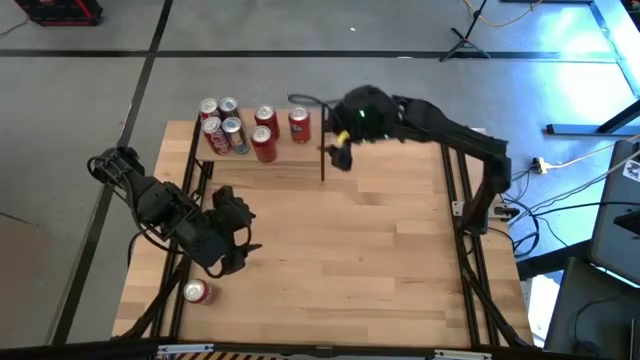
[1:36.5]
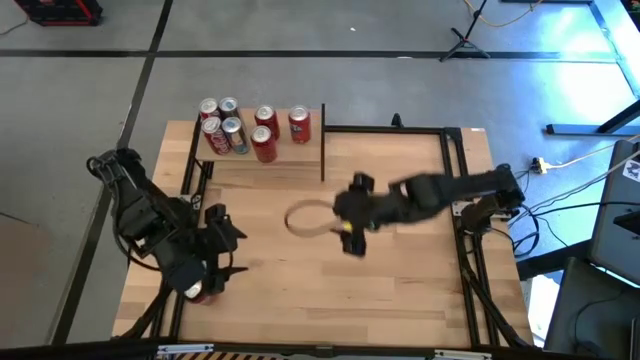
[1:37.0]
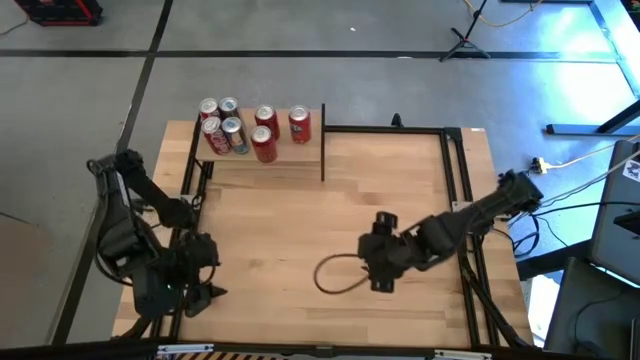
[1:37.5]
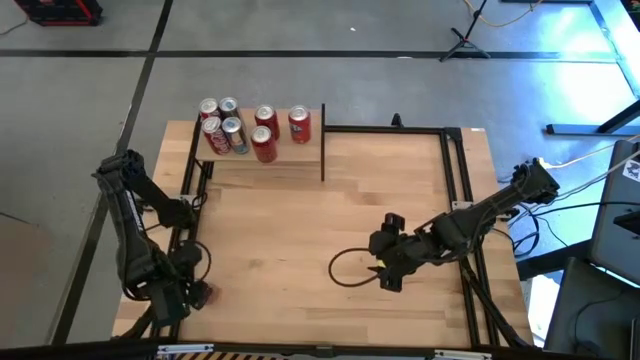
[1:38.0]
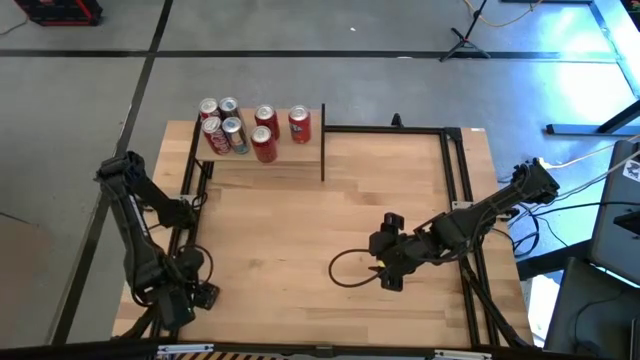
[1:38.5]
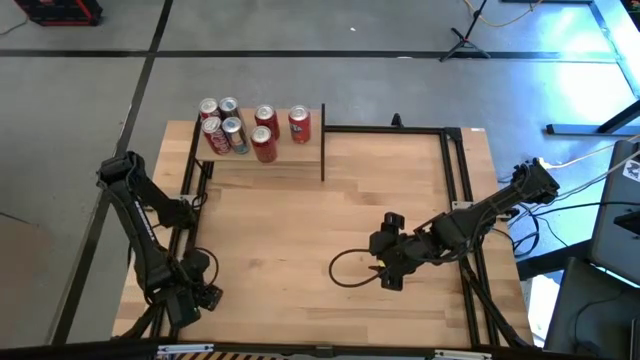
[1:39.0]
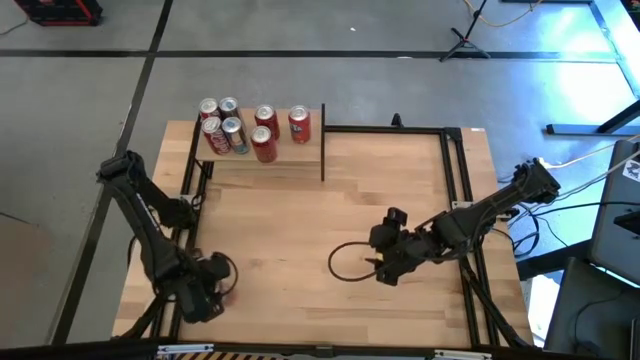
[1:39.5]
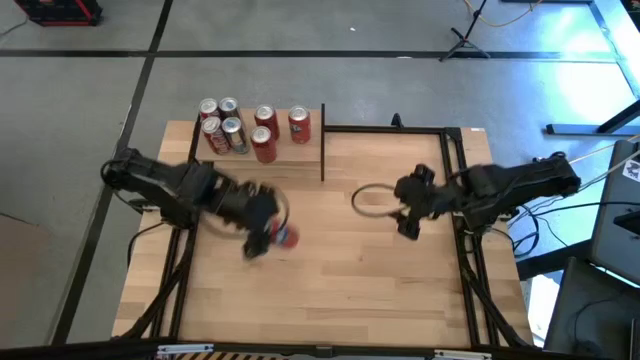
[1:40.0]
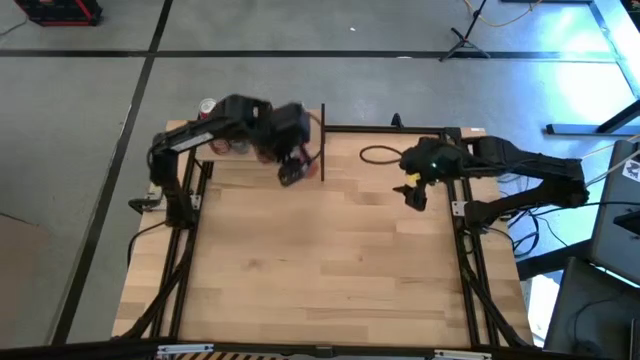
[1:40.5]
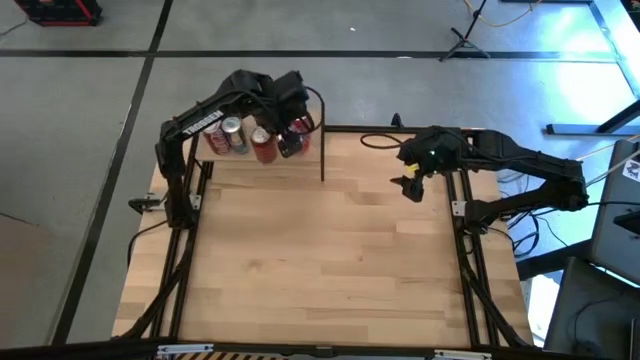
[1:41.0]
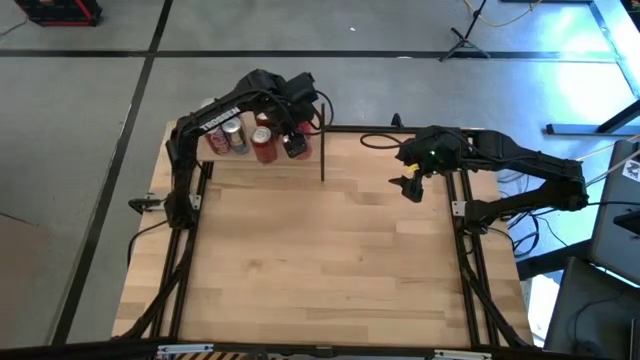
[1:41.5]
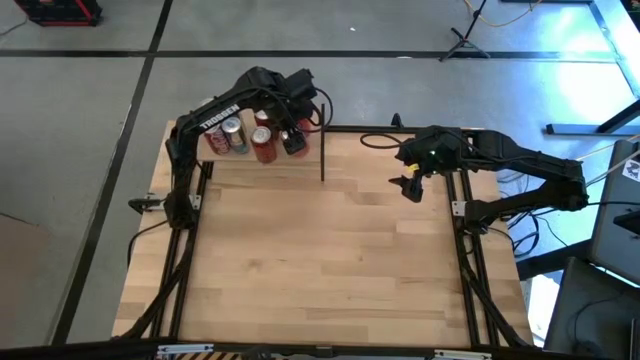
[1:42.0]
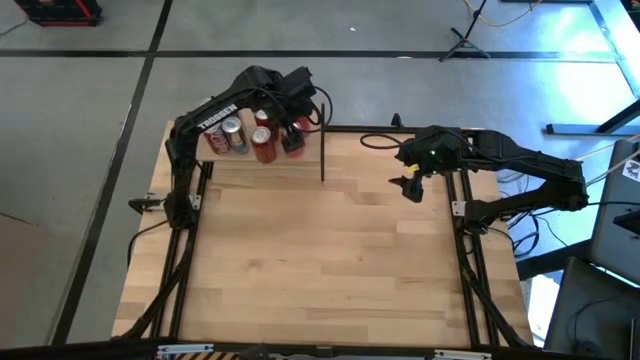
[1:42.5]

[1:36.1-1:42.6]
Task: Place canned beverage on shelf
Put the orange soda can on the shelf aligned with the other orange soda can

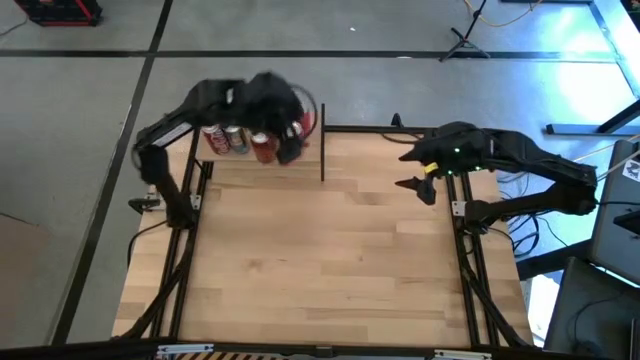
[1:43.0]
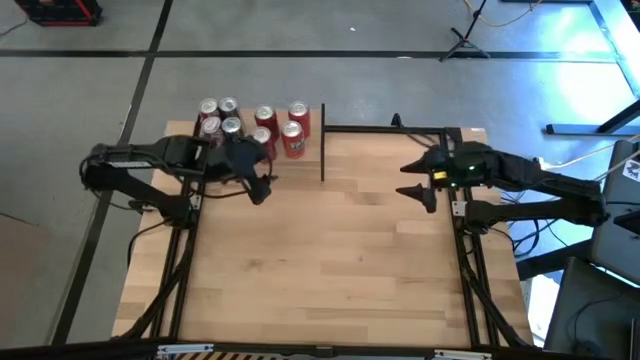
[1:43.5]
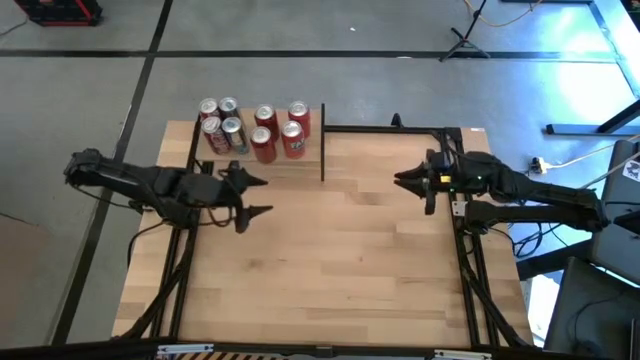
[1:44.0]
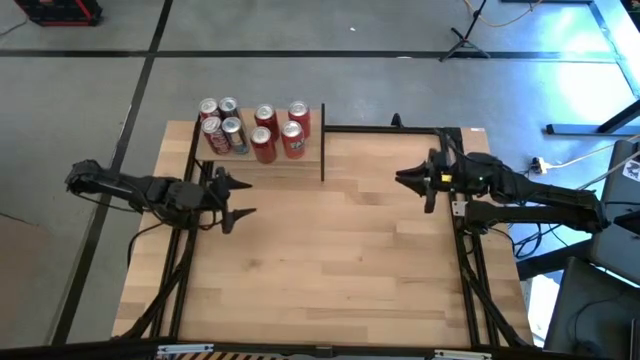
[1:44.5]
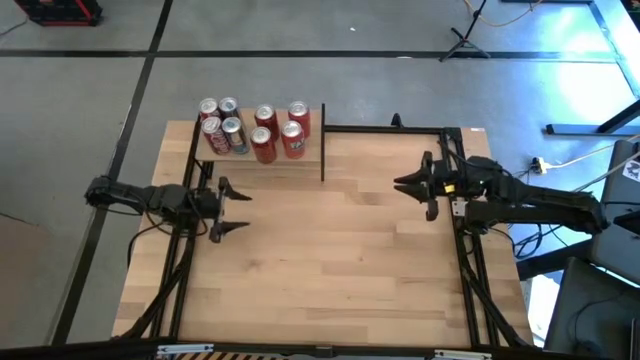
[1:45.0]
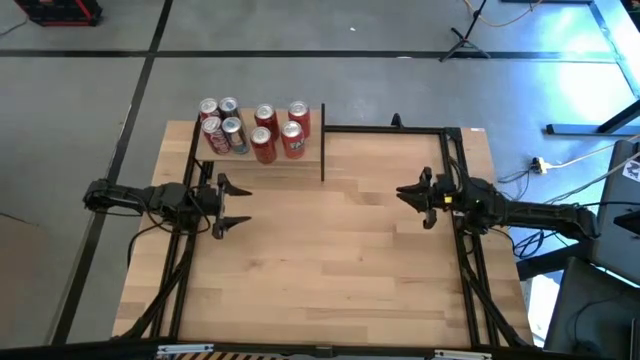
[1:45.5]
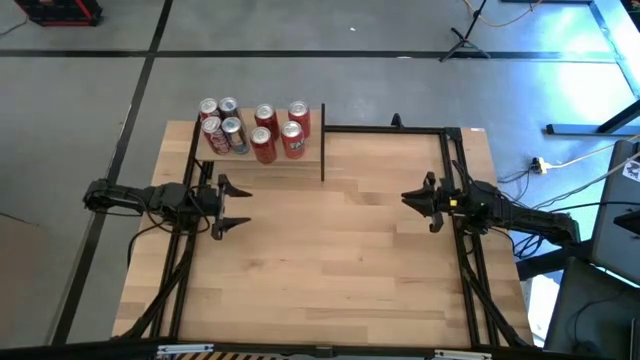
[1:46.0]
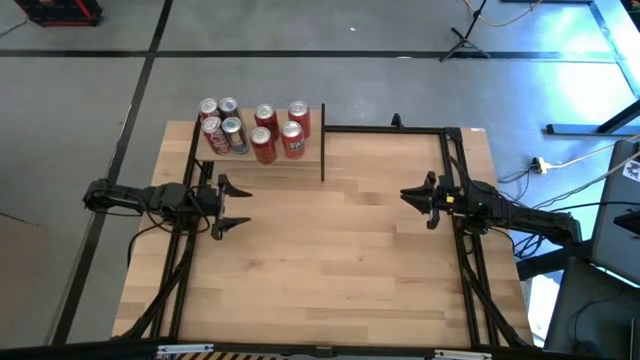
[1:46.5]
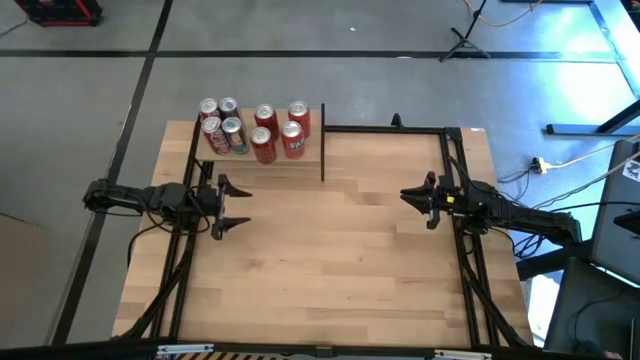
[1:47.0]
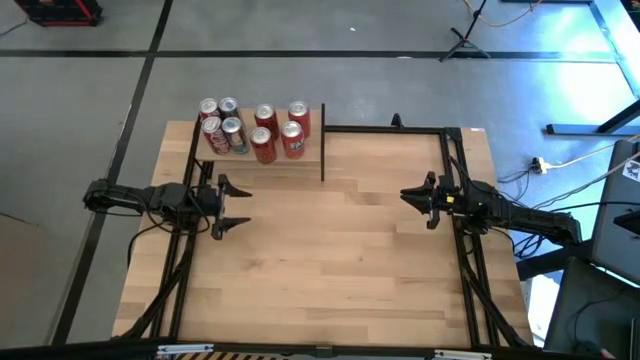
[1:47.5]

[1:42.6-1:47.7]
Return to Home Position

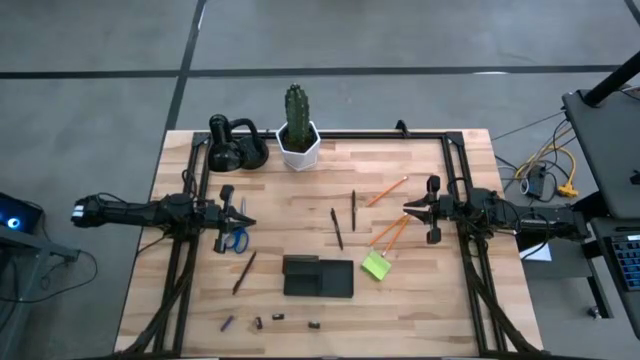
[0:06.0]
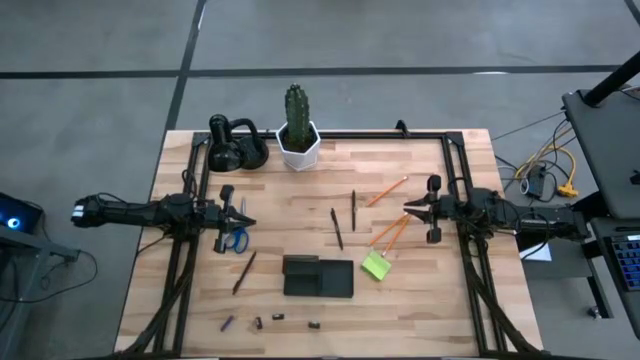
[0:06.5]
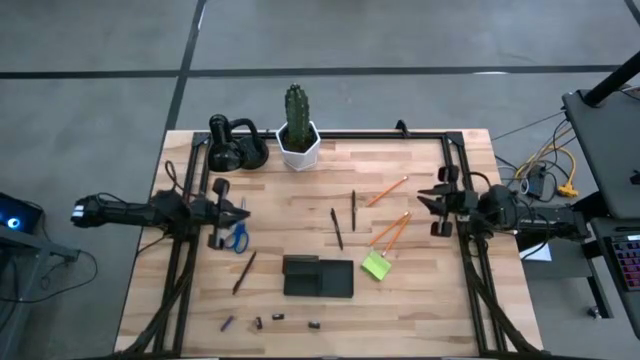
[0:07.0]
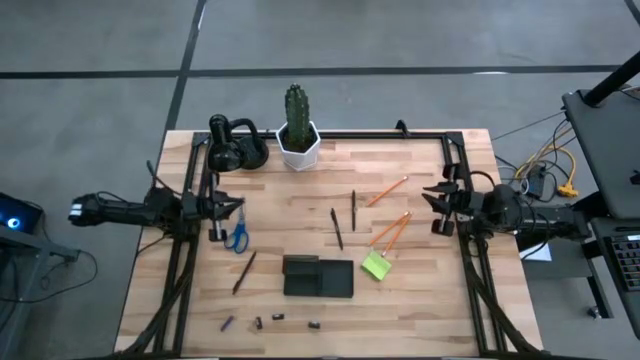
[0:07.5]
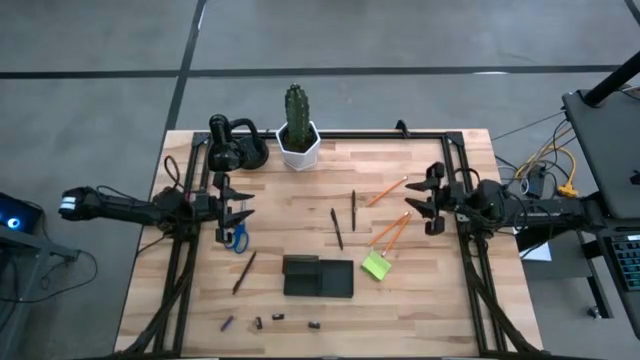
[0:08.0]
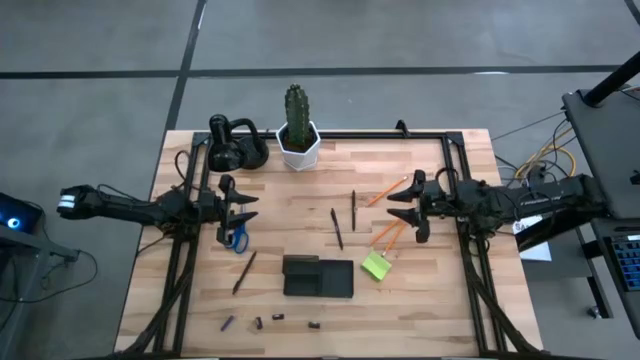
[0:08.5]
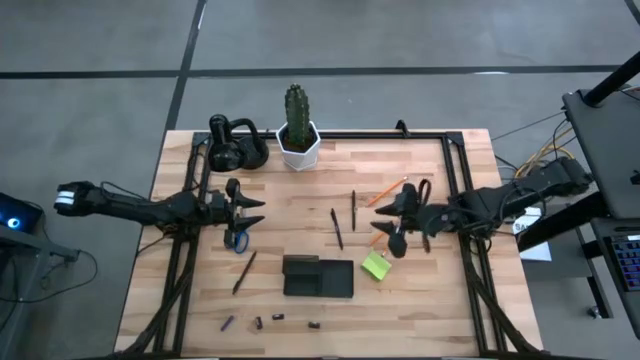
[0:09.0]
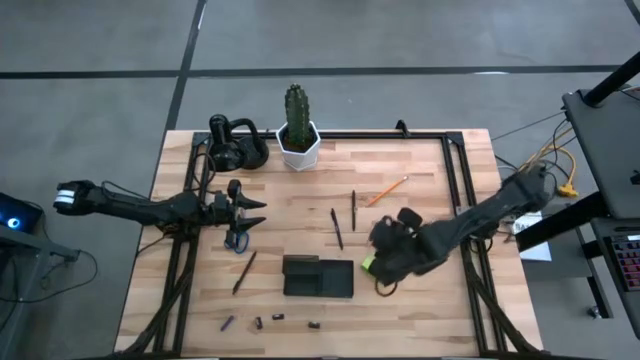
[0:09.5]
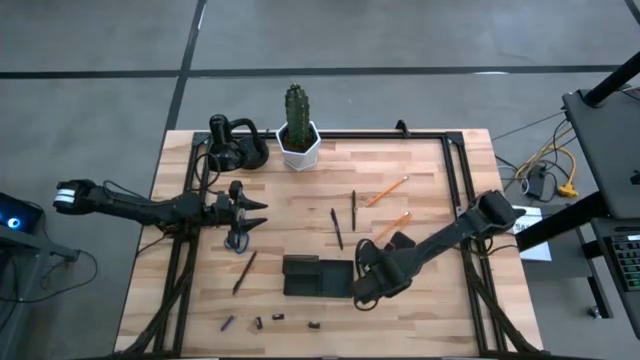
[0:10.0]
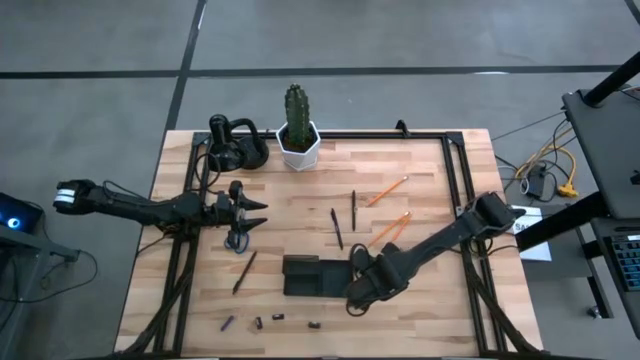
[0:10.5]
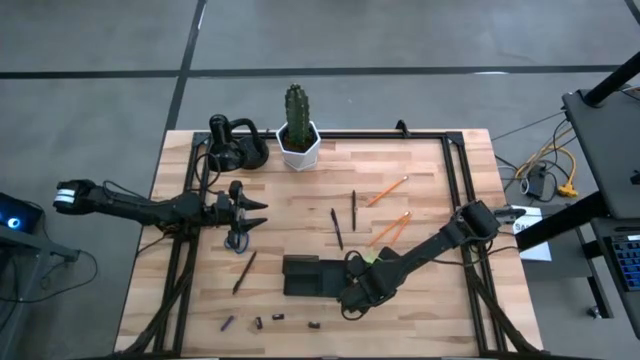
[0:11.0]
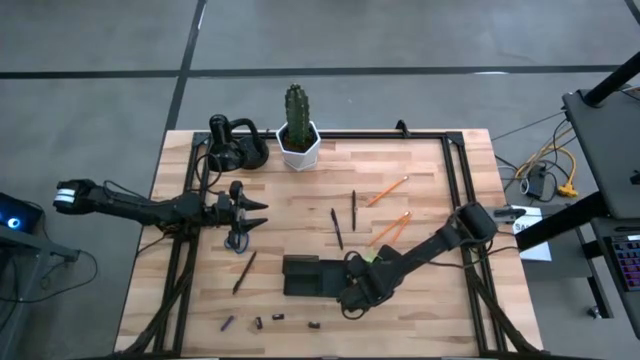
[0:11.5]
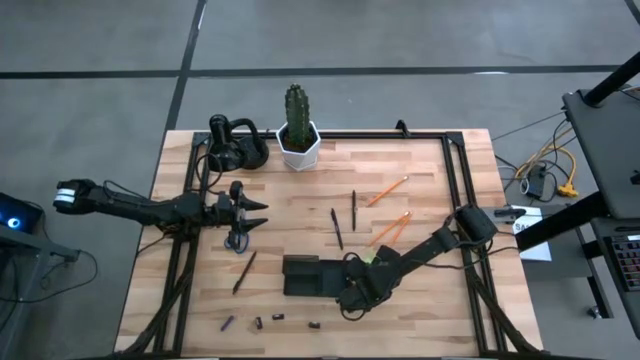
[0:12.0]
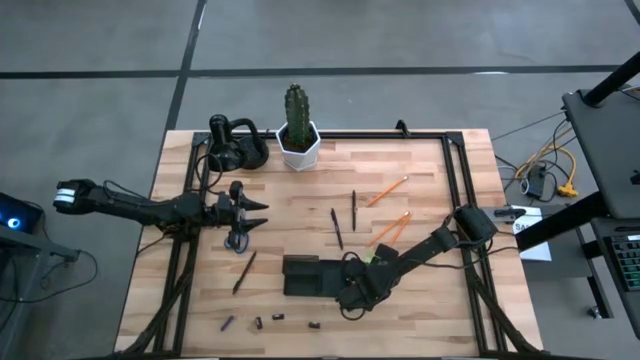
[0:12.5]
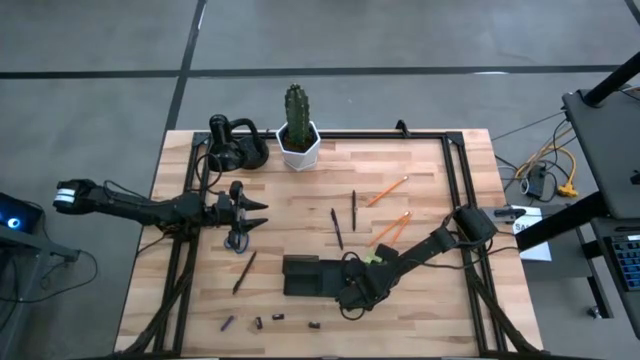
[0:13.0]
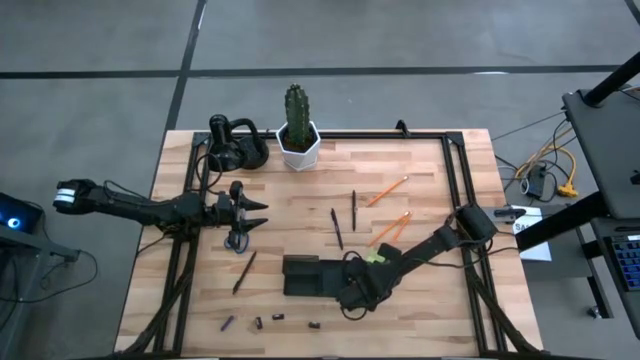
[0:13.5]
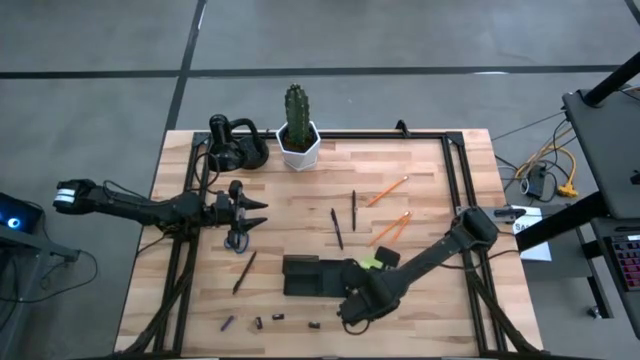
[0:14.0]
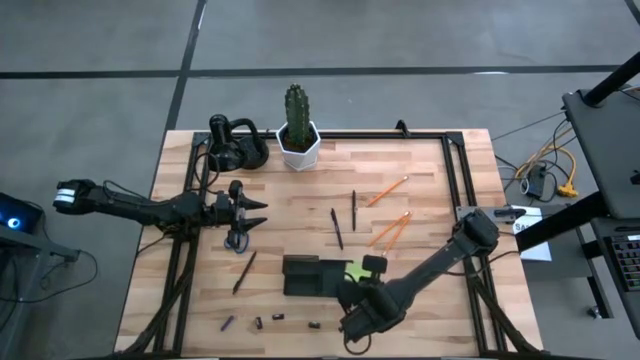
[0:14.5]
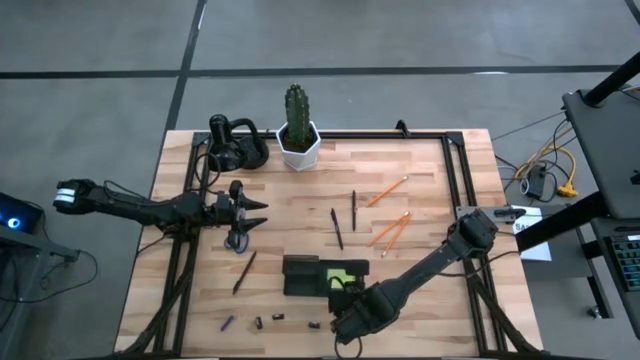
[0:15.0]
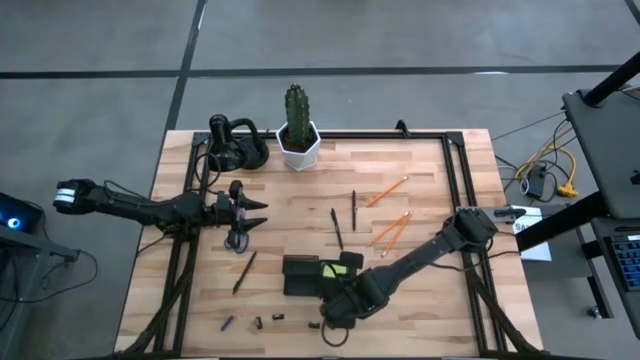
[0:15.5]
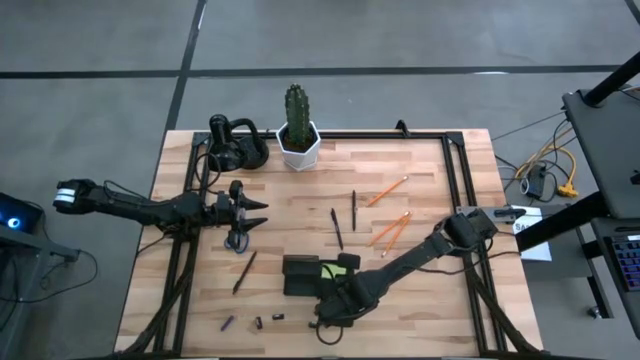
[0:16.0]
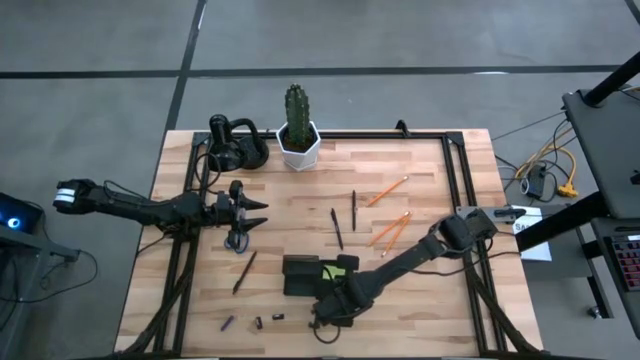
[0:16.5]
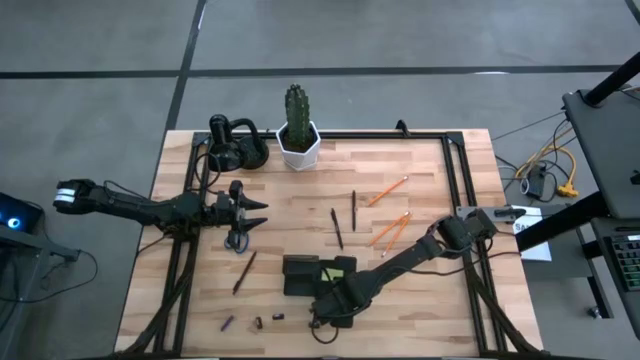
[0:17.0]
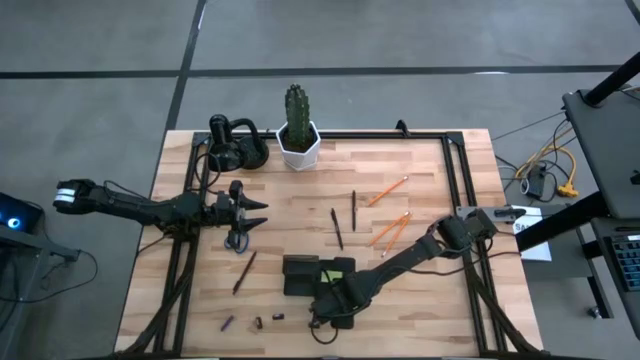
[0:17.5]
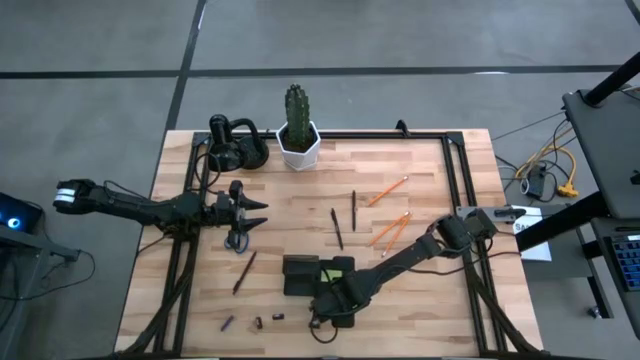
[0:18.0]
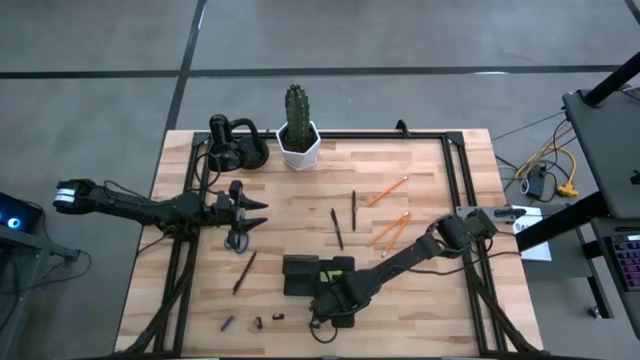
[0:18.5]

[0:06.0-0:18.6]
Task: Pick and place office supplies into organizer
Put the sticky note into the desk organizer
